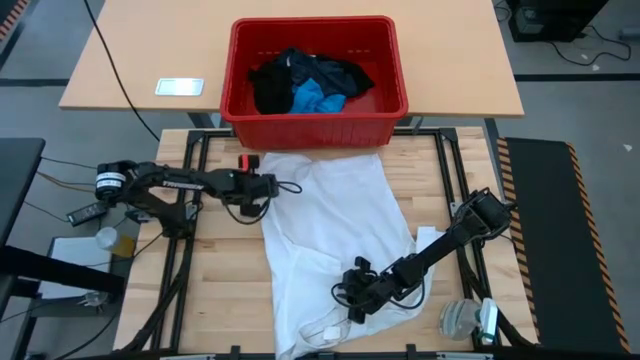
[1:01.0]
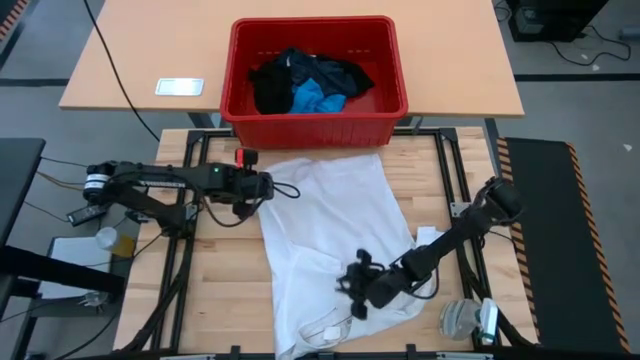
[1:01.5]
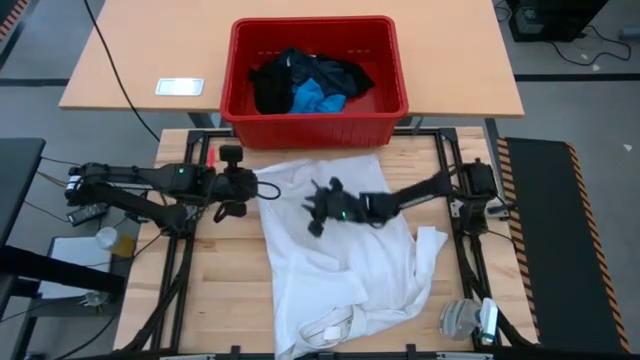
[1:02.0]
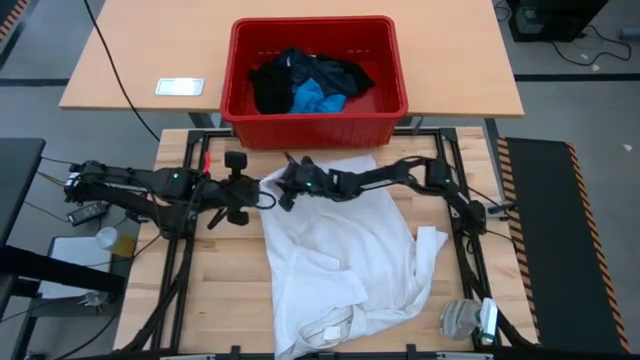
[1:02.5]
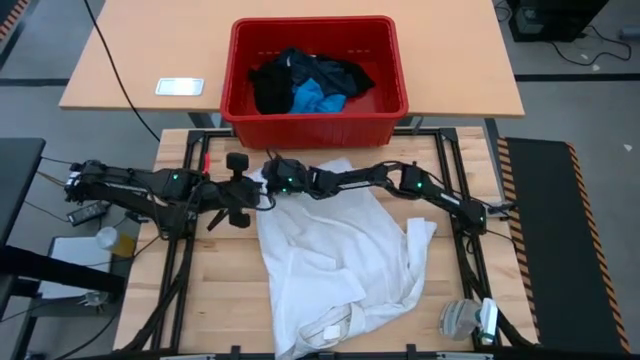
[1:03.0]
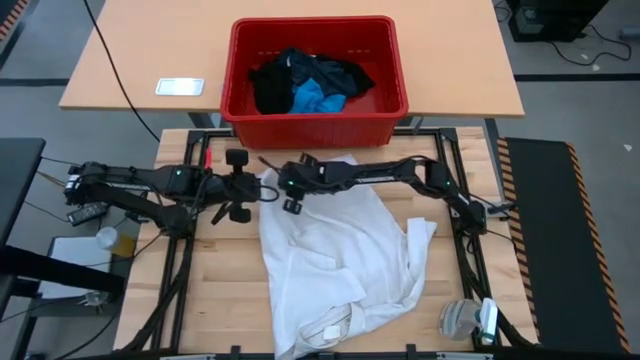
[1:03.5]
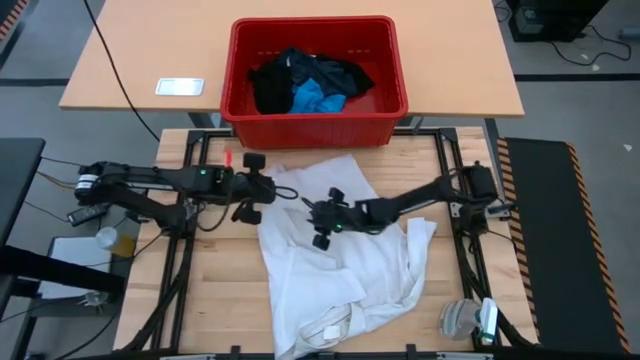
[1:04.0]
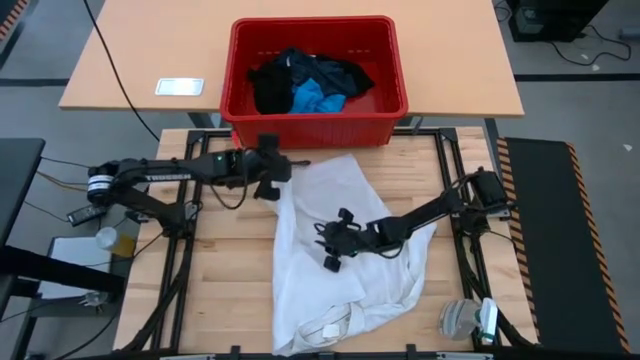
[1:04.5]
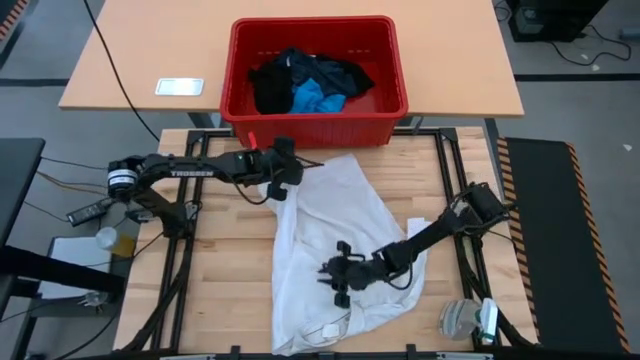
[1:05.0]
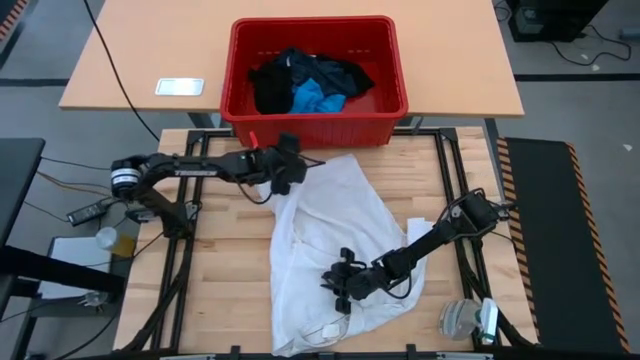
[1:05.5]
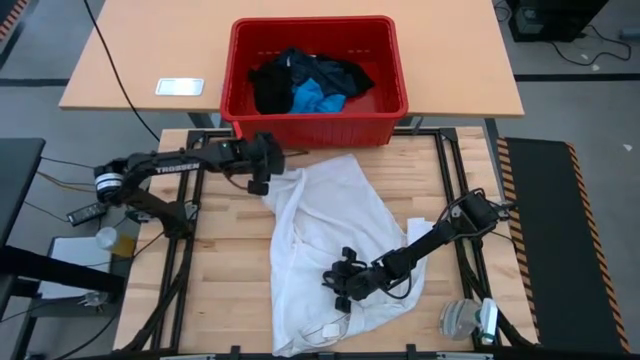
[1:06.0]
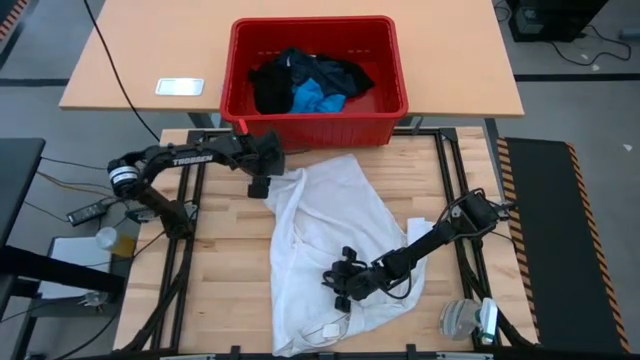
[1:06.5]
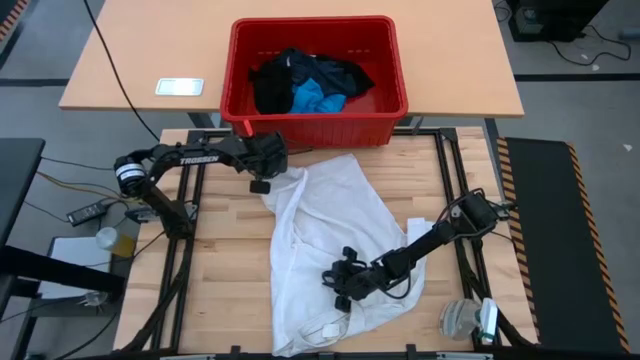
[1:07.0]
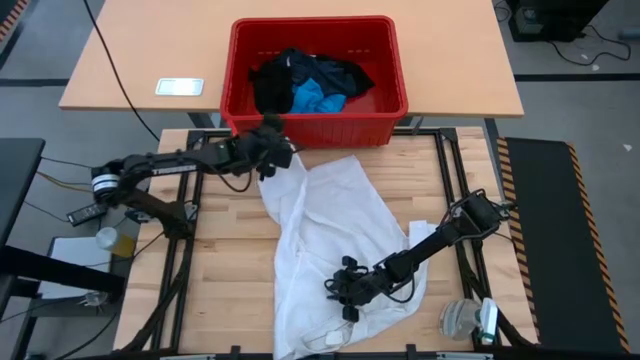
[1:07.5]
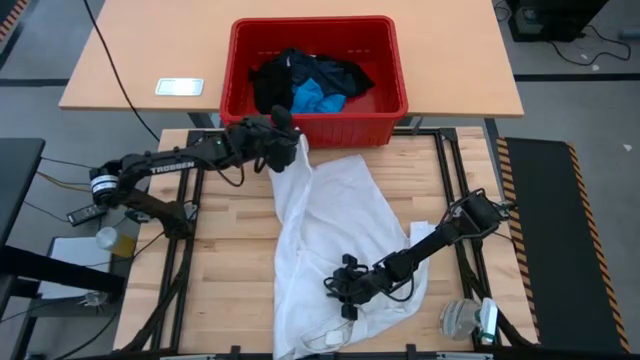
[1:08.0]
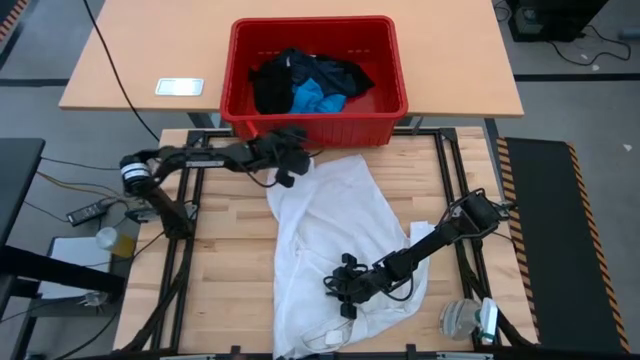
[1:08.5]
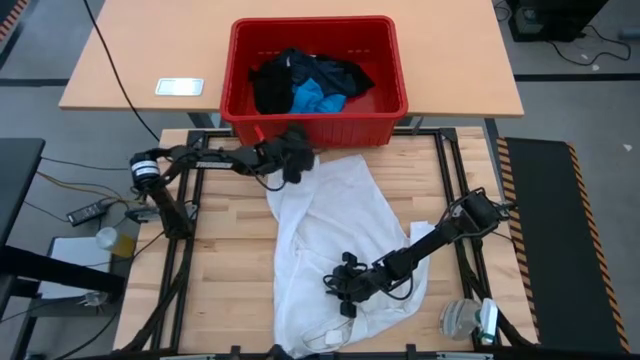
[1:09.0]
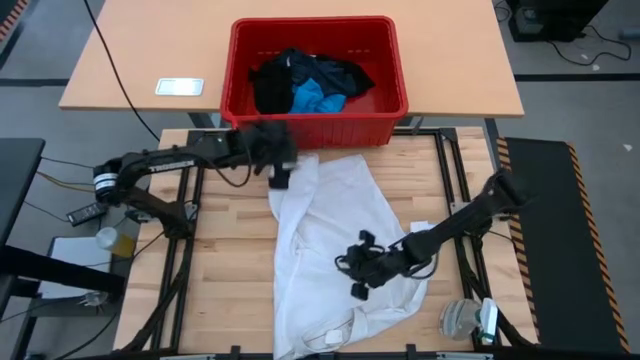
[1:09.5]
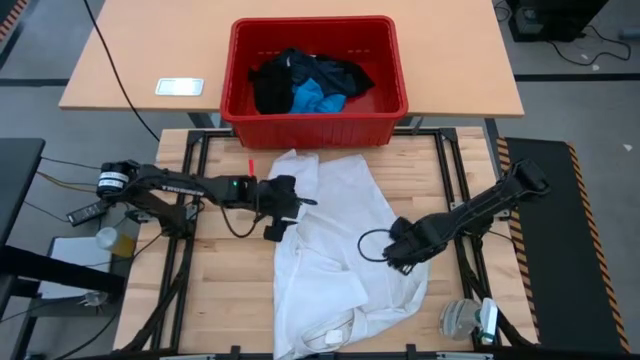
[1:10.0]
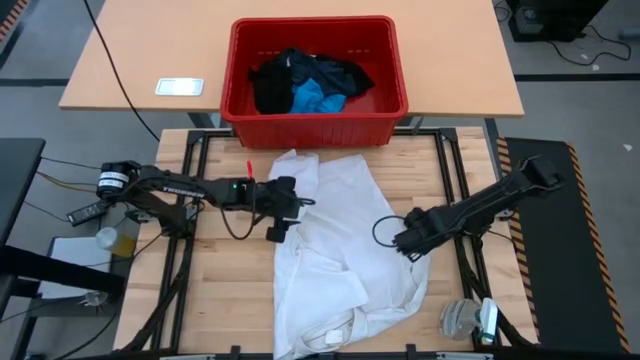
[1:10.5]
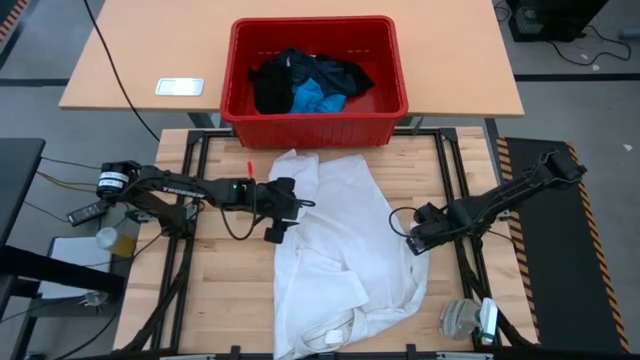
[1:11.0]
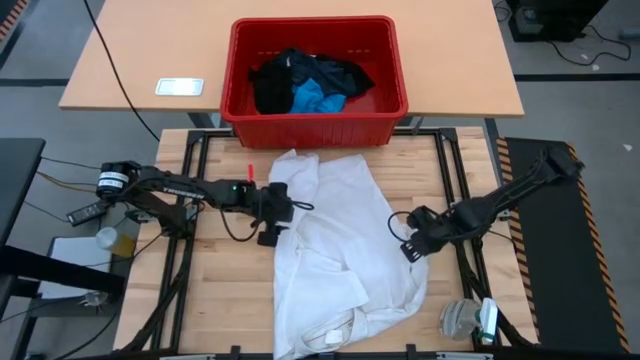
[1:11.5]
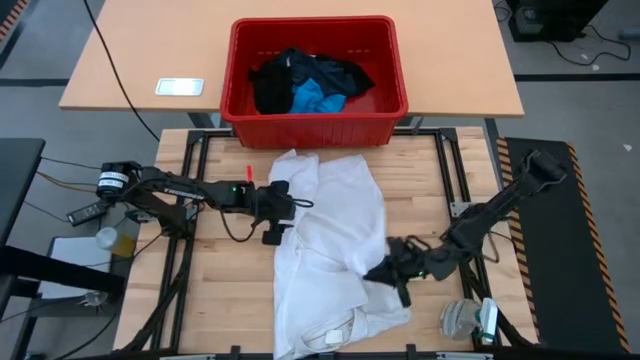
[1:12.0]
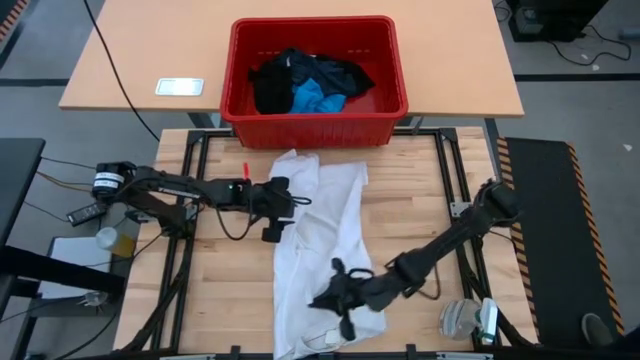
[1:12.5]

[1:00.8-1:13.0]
Task: Fold laundry
Fold the white polo

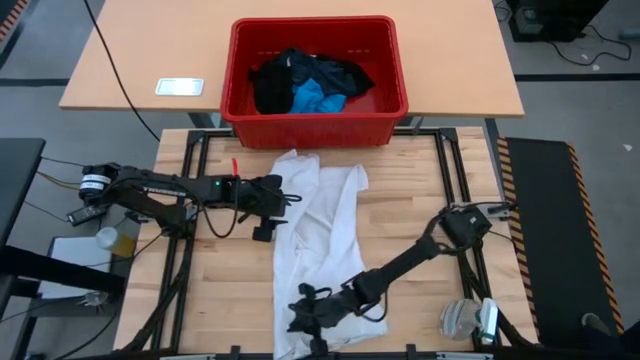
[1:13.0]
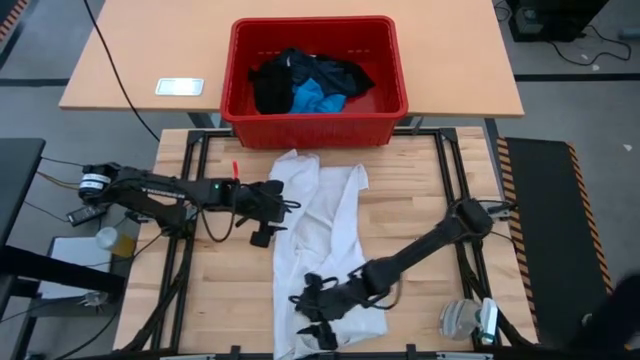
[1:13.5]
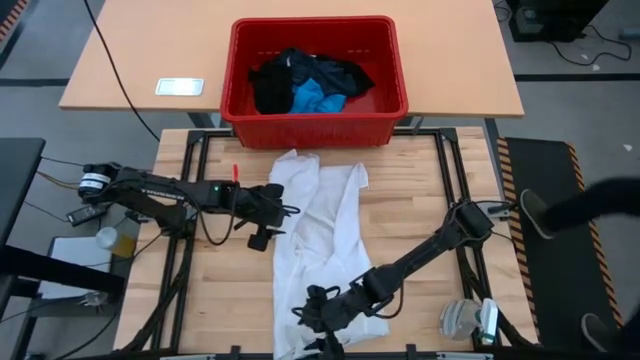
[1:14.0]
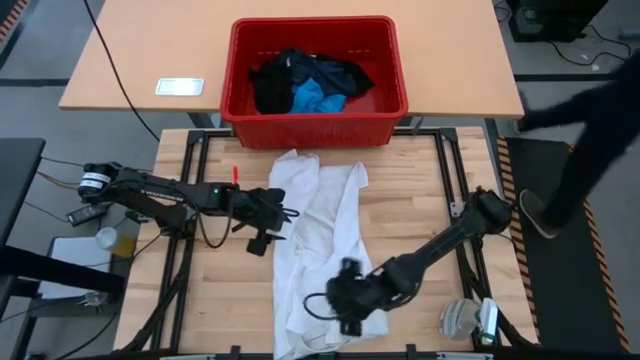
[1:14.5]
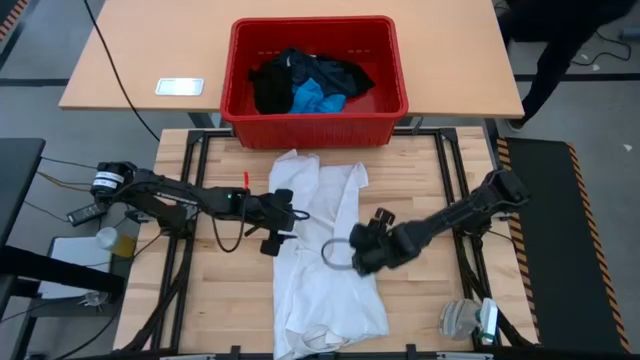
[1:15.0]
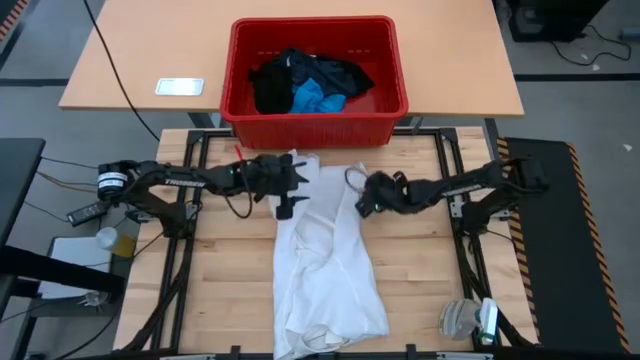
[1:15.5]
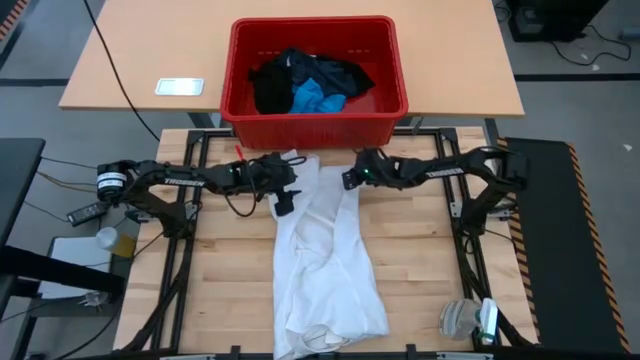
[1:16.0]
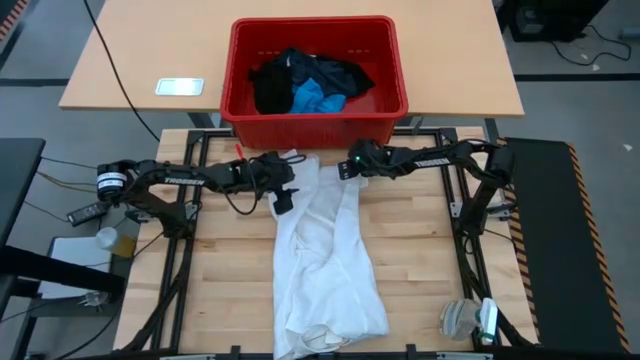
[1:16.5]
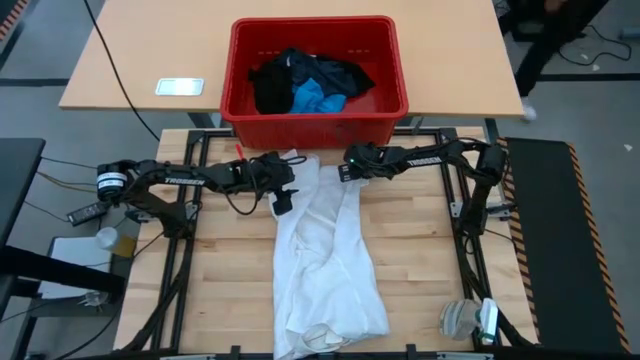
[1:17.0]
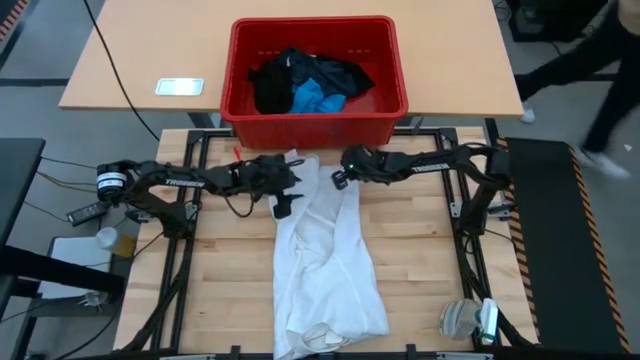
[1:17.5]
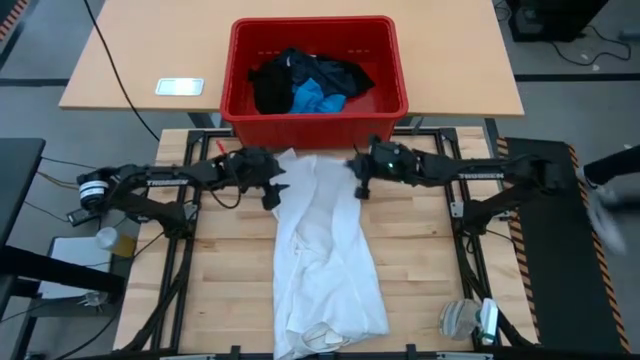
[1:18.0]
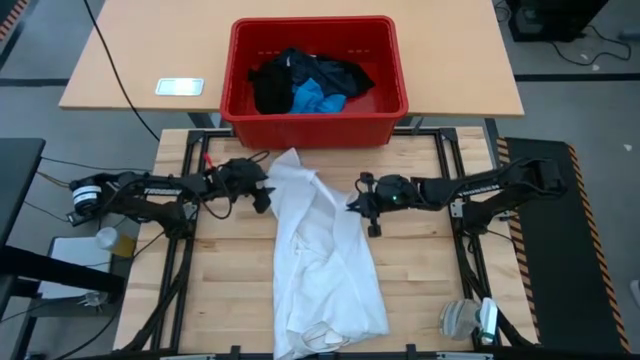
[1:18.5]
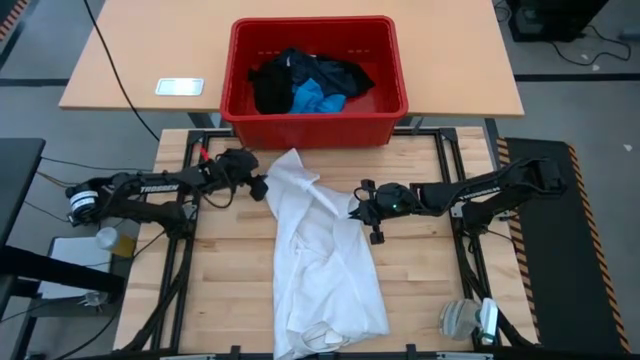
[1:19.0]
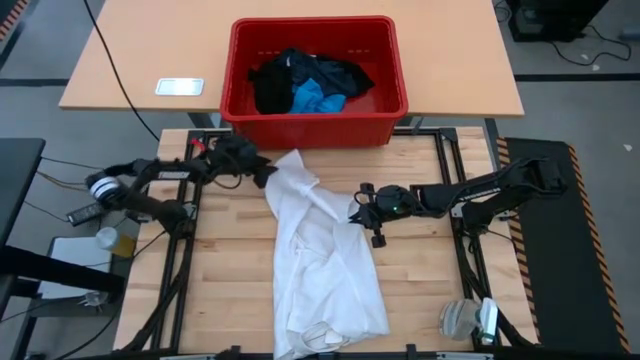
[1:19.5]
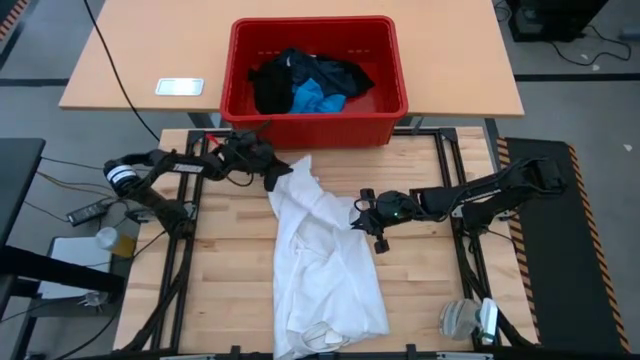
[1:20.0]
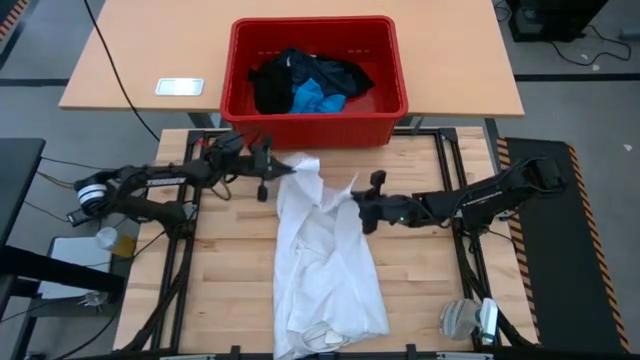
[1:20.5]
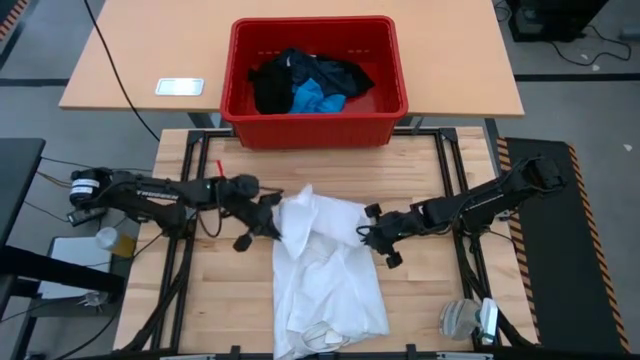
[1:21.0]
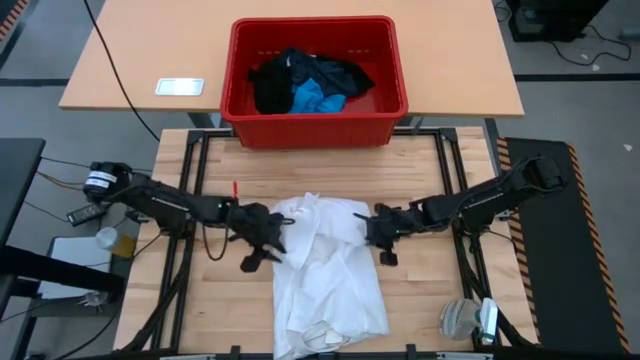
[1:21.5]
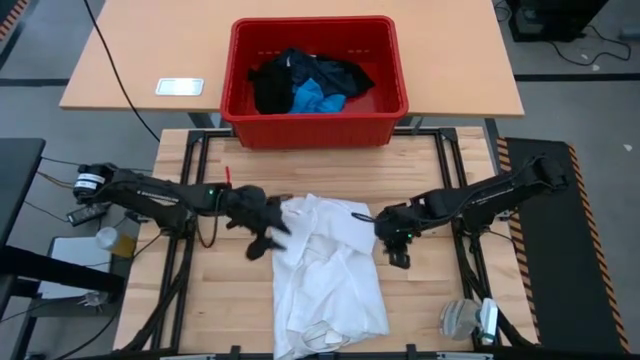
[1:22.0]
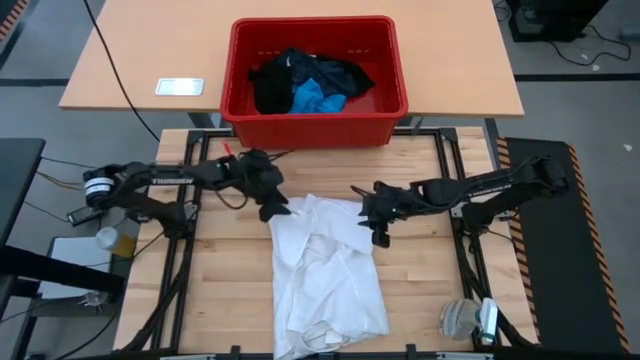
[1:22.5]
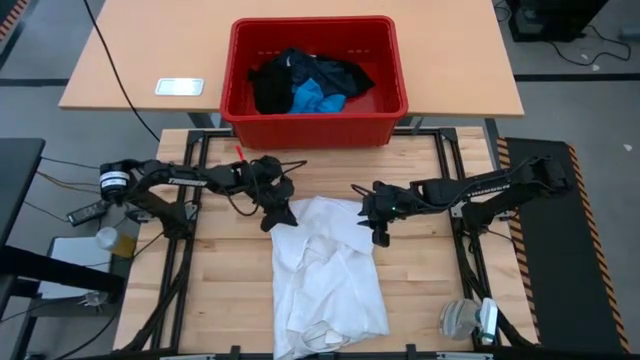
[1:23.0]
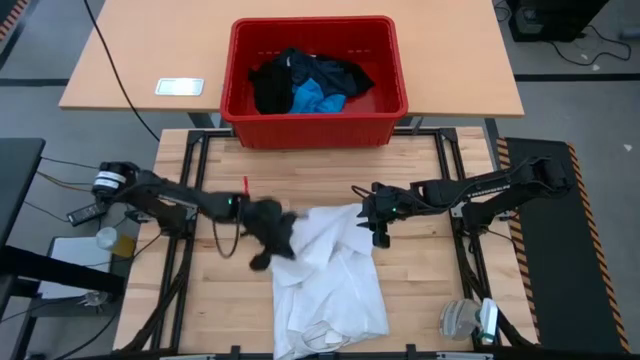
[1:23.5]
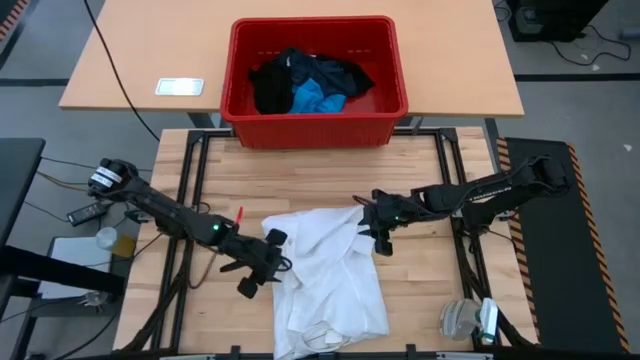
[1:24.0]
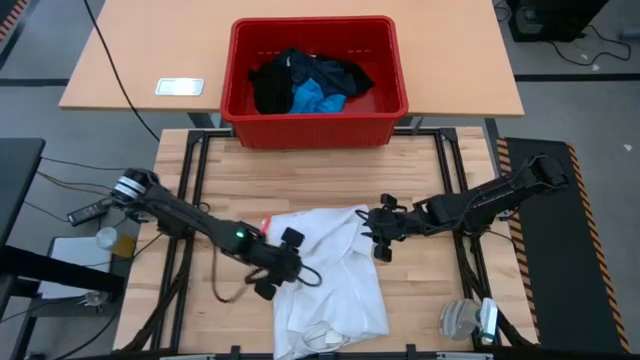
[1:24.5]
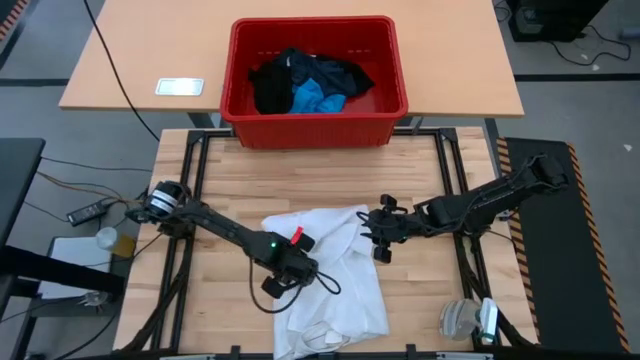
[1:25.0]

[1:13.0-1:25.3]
Fold the white polo
